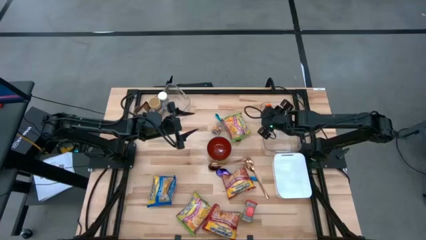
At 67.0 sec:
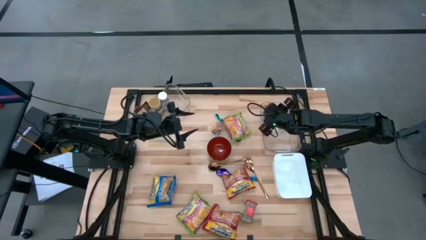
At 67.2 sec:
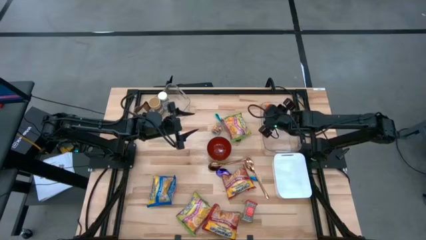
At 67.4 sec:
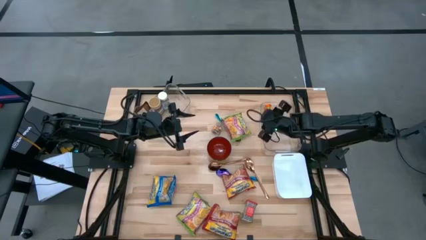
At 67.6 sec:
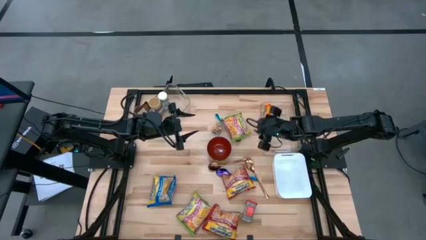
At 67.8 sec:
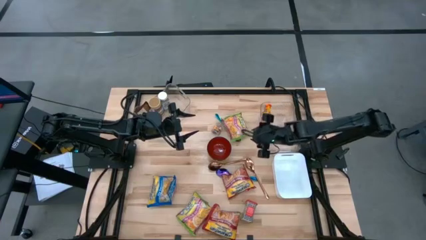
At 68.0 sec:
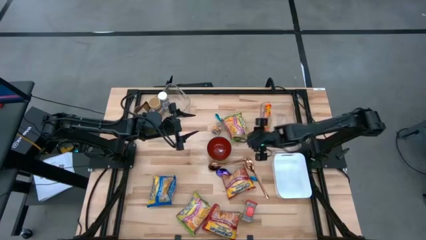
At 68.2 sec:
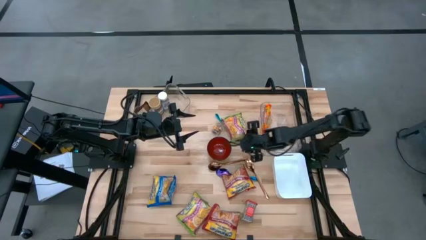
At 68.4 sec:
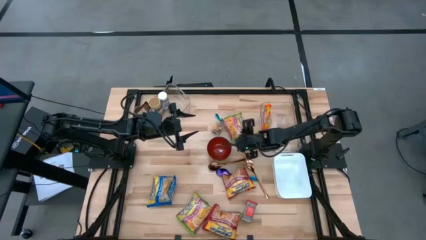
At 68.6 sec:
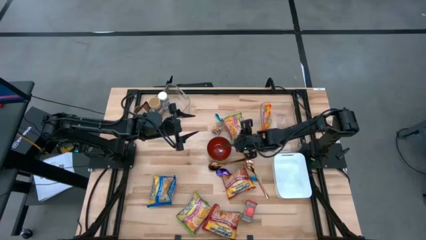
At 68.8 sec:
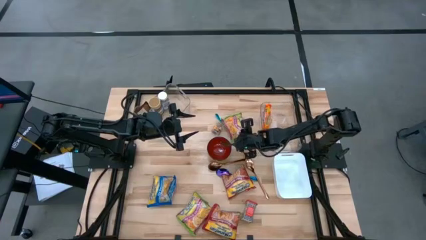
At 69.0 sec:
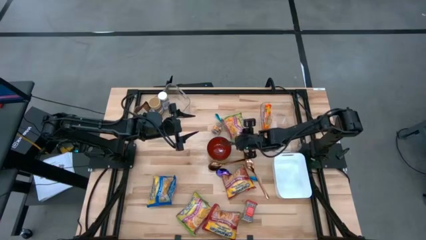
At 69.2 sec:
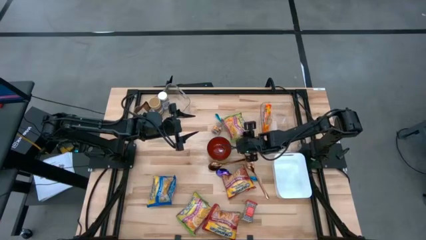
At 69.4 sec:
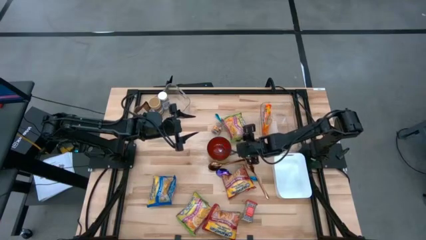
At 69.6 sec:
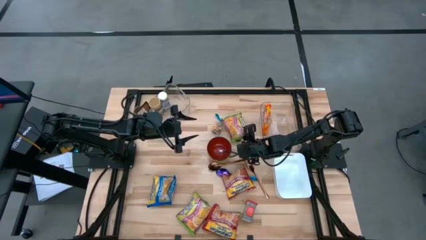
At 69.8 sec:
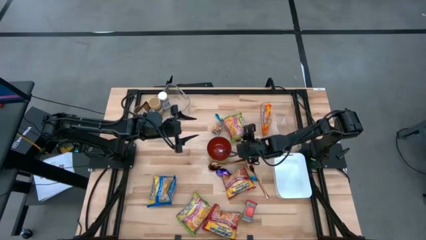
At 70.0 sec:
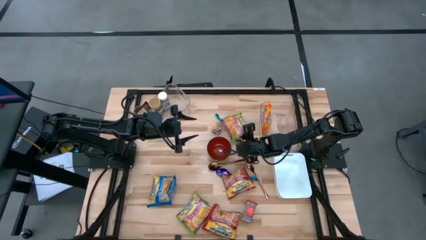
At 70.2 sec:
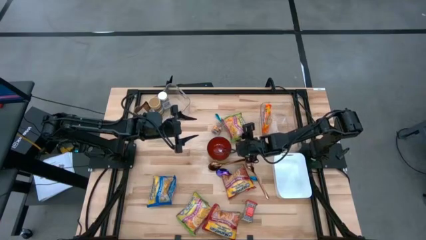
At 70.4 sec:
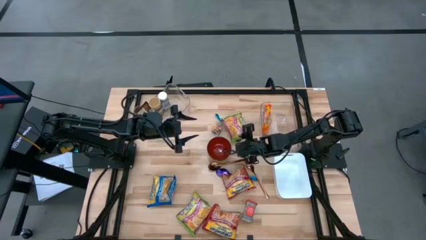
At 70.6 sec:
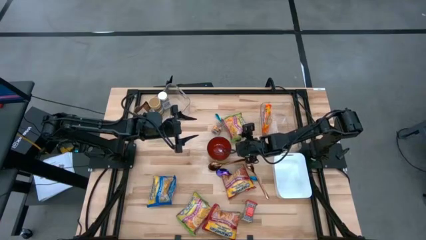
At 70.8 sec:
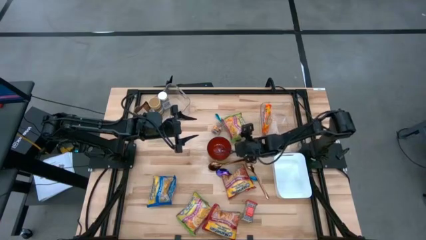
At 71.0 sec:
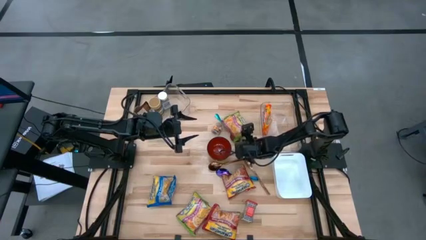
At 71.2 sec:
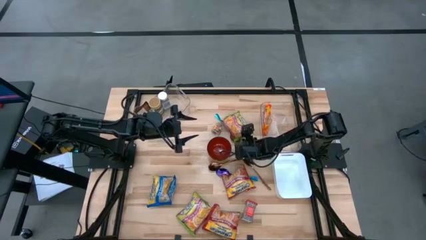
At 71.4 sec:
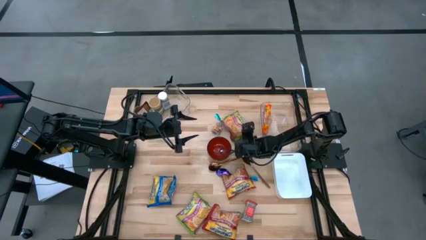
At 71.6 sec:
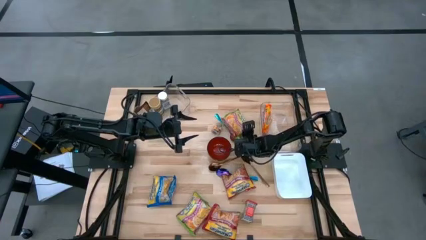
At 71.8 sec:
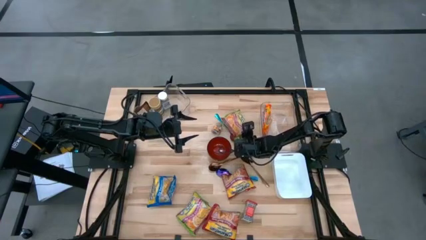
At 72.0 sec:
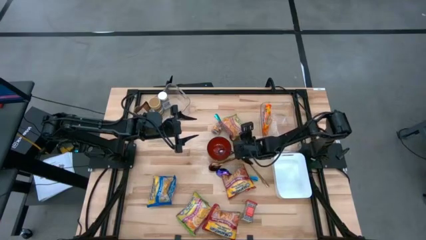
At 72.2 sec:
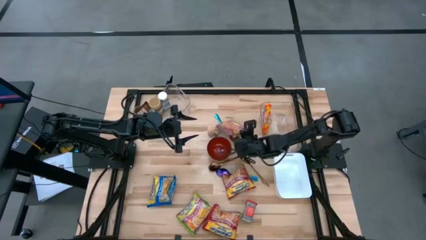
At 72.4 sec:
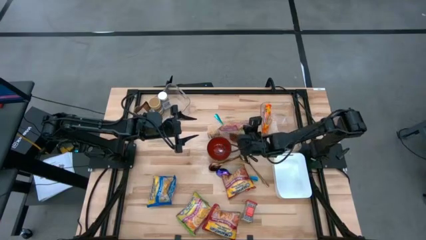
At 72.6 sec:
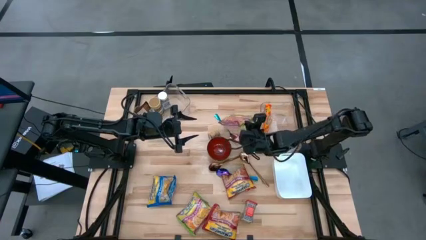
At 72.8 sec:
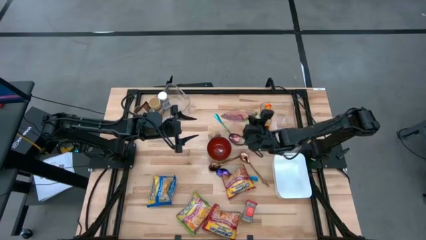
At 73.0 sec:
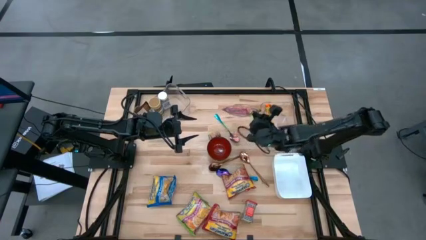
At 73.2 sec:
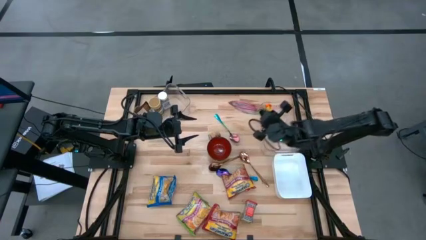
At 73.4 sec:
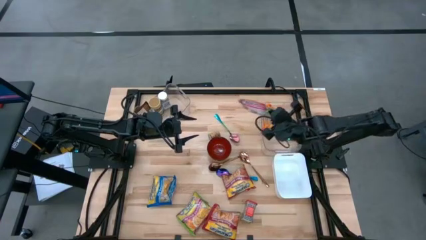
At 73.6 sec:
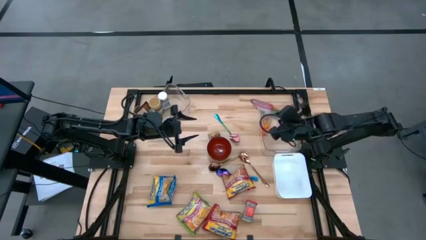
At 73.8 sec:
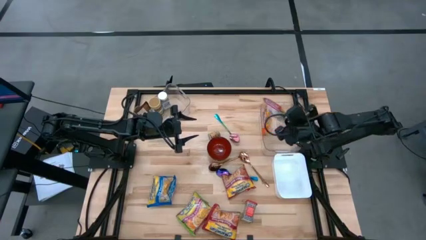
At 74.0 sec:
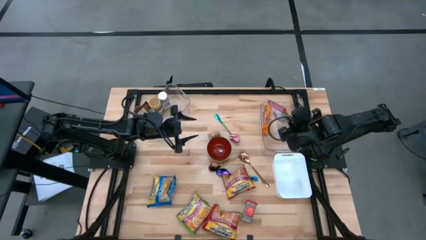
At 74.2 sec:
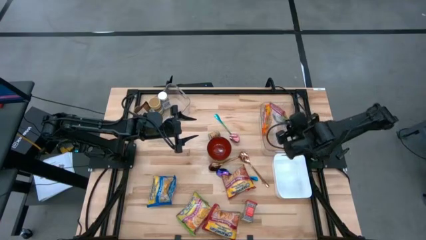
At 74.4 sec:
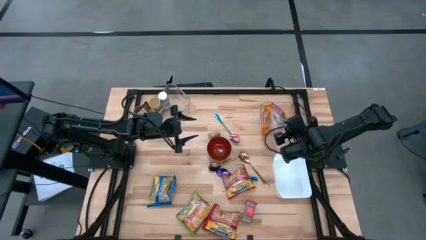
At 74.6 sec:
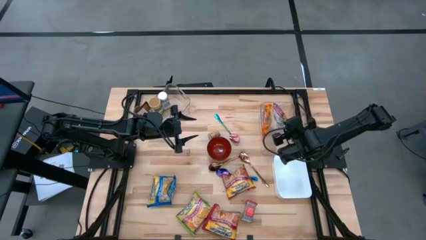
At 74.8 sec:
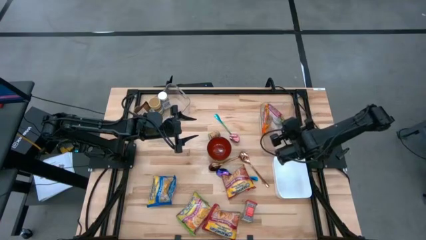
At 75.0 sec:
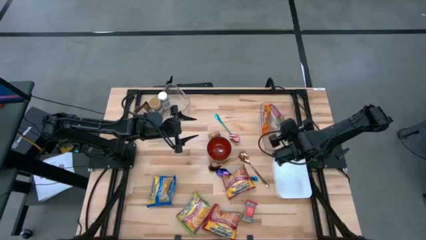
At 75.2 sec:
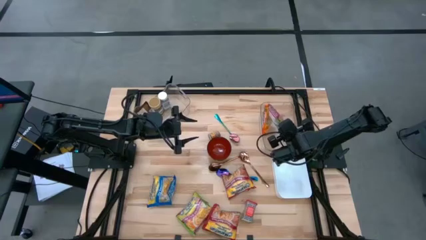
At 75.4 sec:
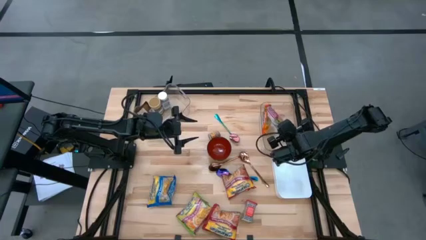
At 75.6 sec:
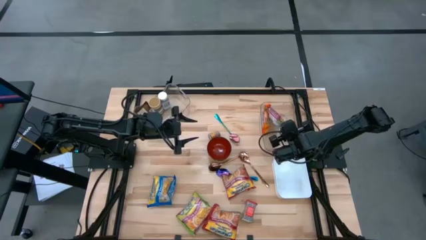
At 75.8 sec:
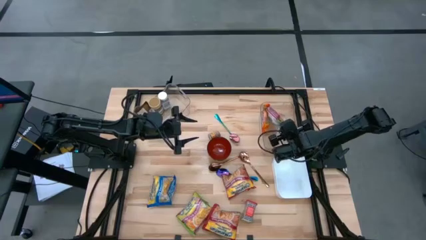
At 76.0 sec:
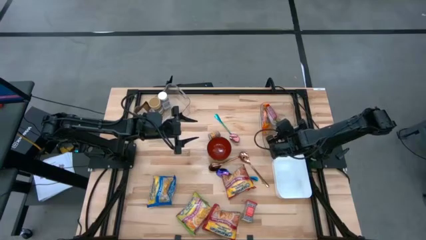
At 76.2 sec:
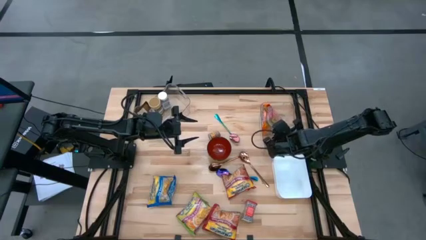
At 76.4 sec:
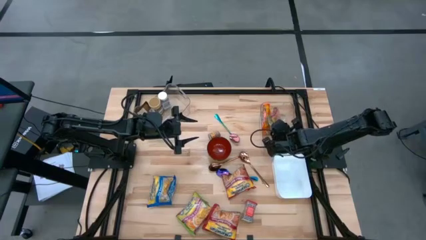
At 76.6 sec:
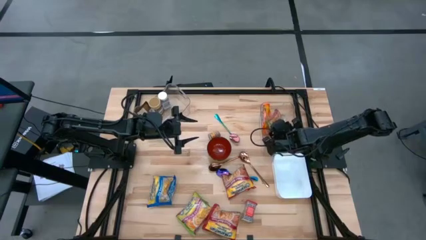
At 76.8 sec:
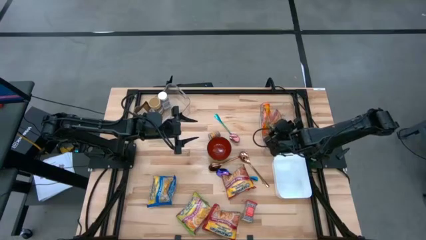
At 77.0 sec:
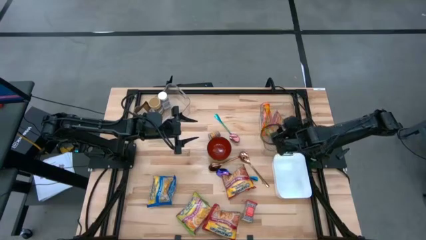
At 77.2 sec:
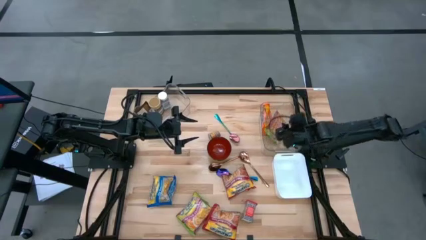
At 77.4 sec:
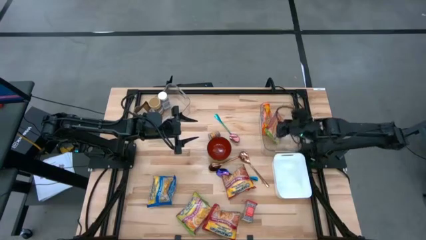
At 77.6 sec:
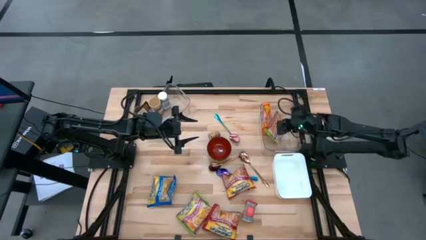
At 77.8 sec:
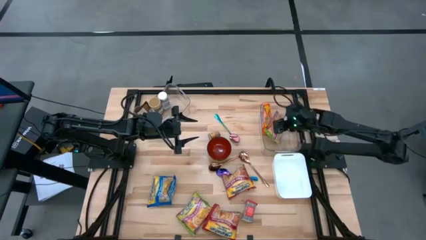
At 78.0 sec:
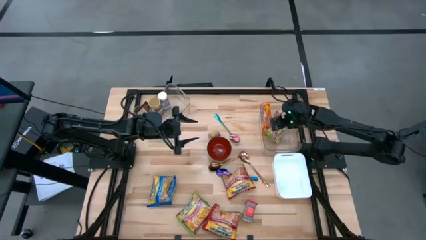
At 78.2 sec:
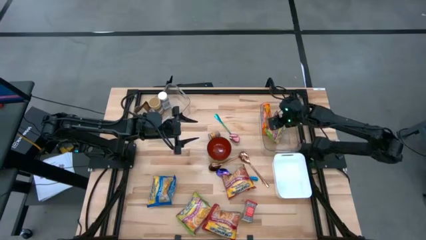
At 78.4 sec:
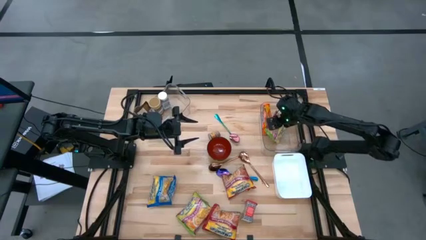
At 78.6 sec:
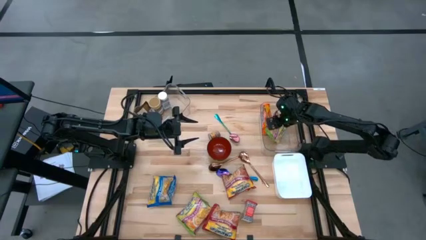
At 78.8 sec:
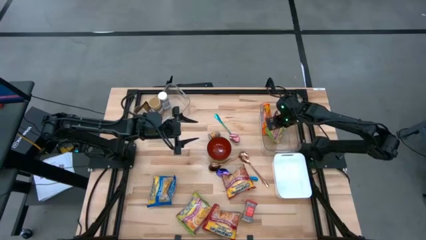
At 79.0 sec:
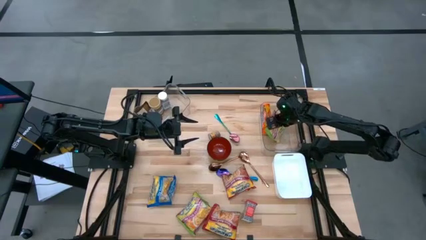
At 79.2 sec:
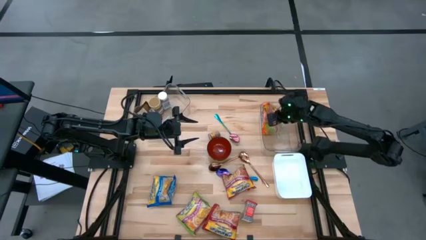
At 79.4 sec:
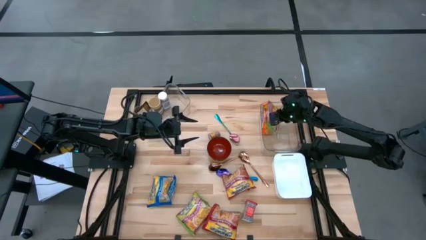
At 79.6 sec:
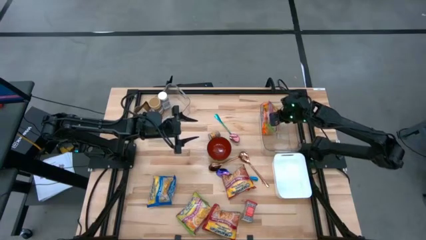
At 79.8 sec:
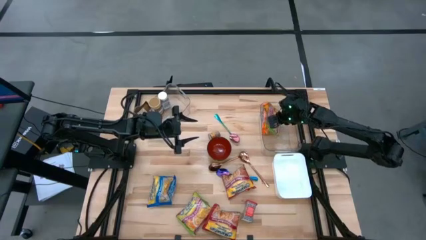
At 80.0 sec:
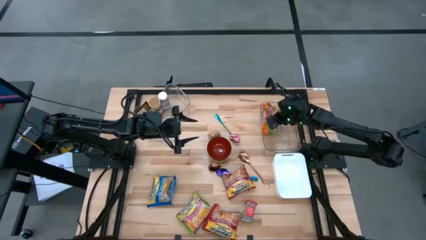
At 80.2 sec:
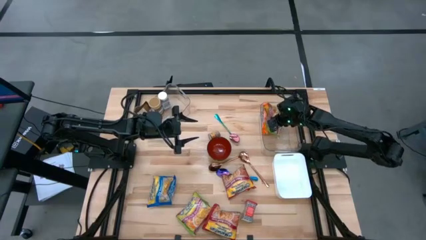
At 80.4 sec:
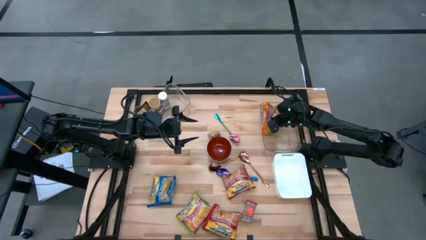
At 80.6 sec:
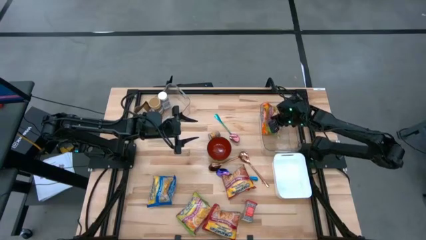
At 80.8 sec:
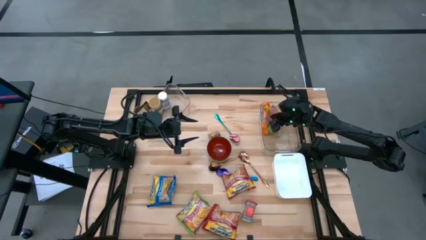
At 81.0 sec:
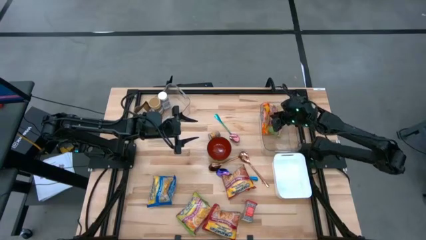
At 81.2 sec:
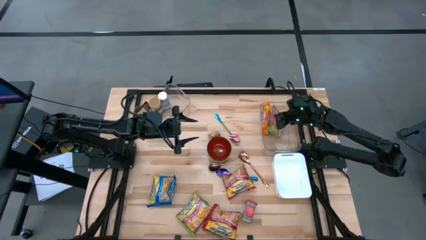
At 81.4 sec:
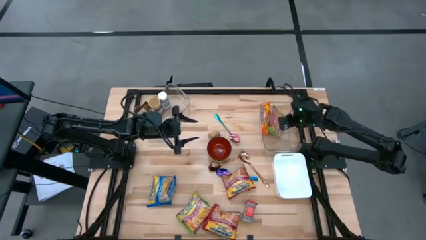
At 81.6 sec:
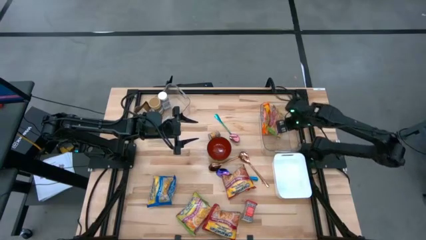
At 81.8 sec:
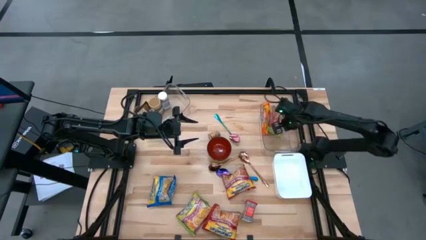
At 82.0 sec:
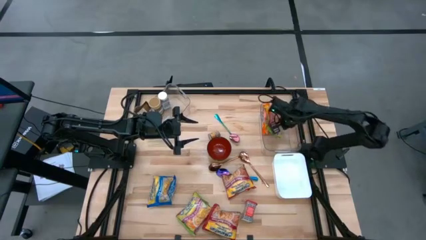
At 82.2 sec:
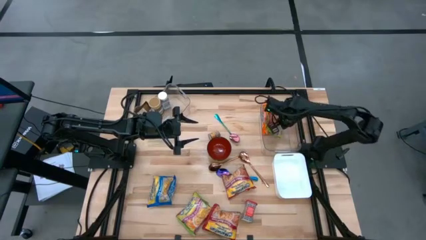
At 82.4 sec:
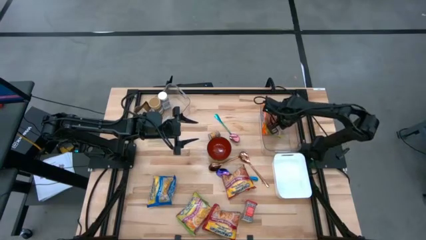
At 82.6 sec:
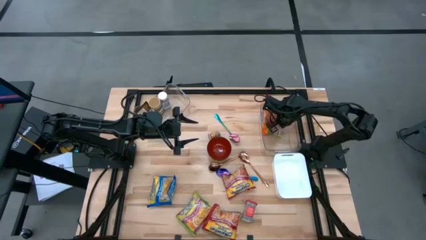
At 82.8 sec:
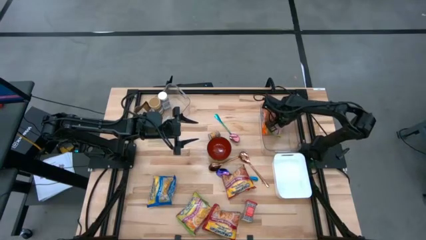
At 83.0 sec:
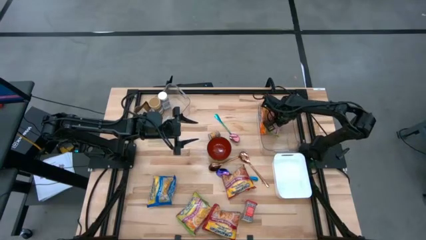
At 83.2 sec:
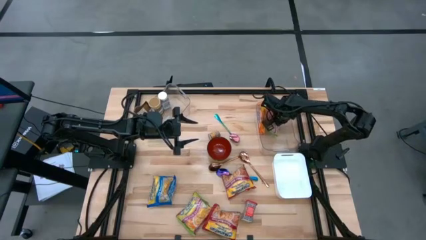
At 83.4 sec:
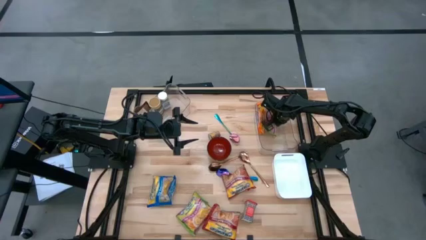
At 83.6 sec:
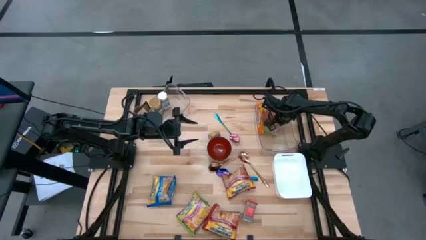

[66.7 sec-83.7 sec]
Task: Pick & Place Food Item
Put the top green noodle pack into the right transparent bin
